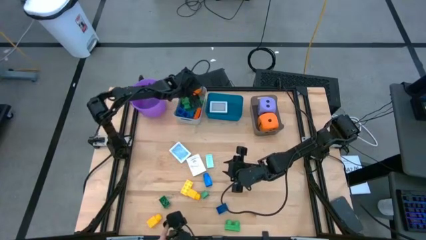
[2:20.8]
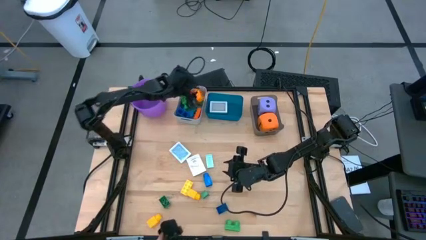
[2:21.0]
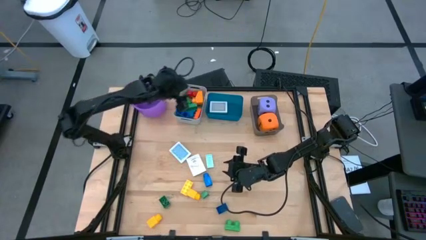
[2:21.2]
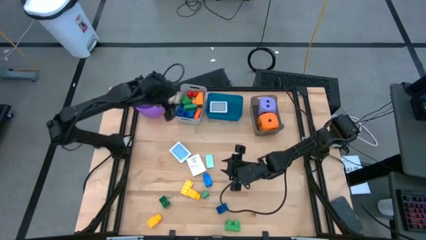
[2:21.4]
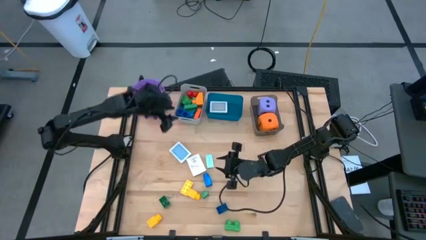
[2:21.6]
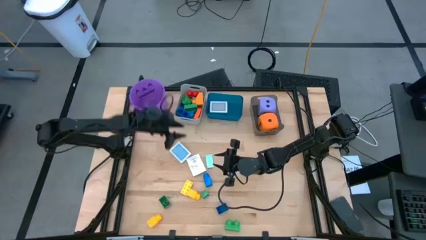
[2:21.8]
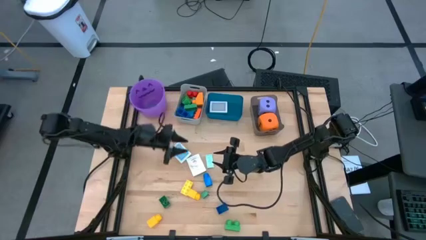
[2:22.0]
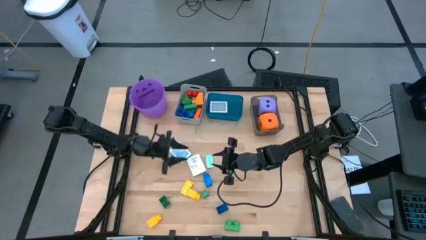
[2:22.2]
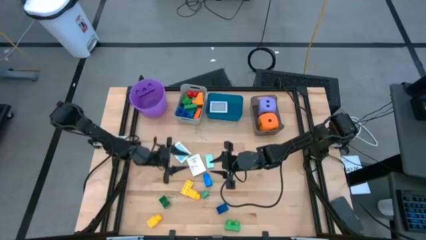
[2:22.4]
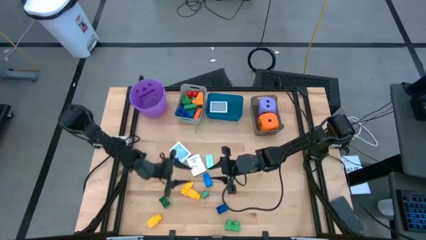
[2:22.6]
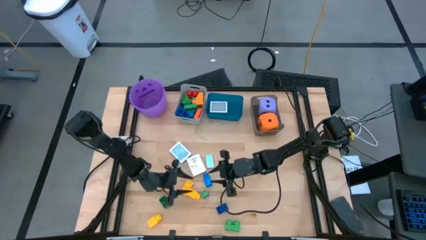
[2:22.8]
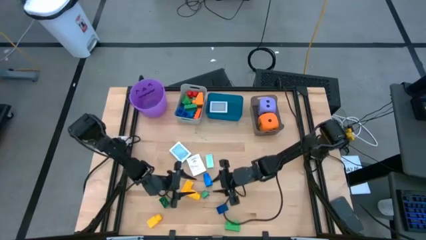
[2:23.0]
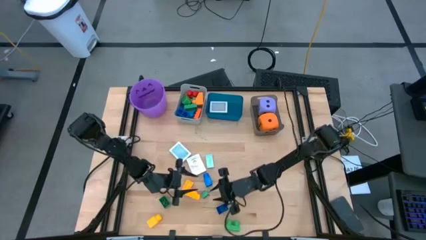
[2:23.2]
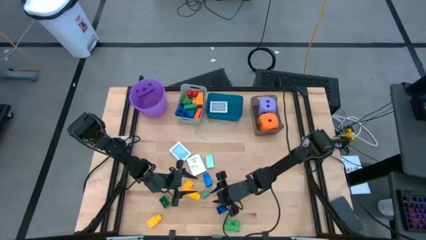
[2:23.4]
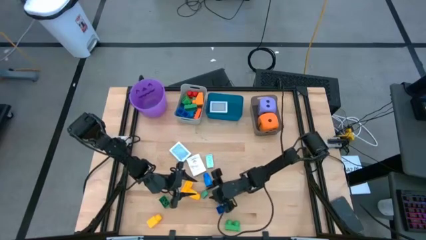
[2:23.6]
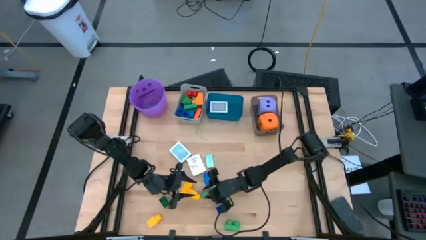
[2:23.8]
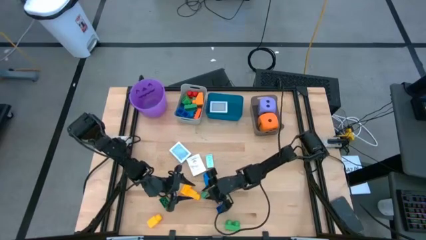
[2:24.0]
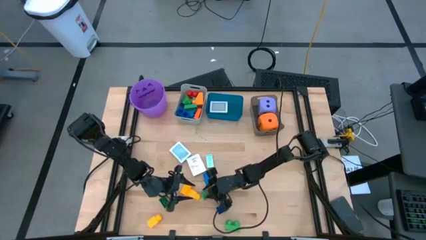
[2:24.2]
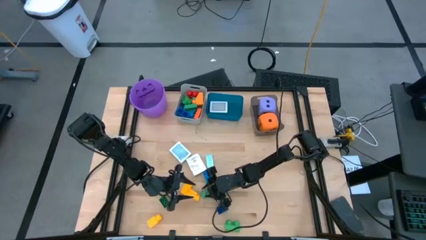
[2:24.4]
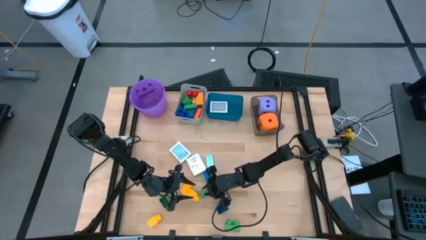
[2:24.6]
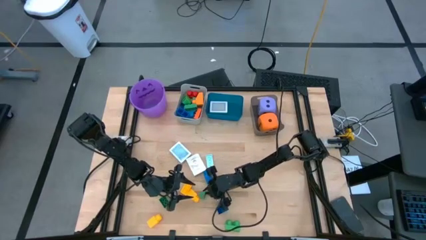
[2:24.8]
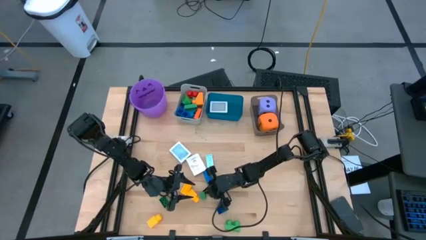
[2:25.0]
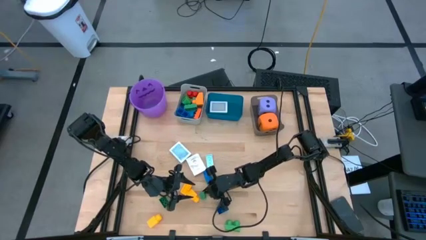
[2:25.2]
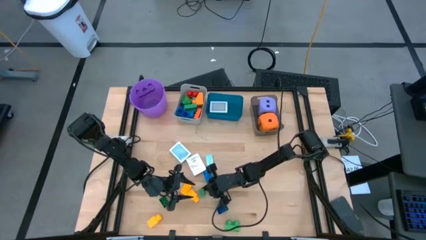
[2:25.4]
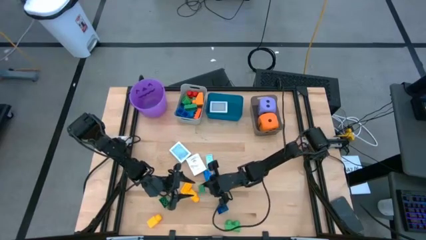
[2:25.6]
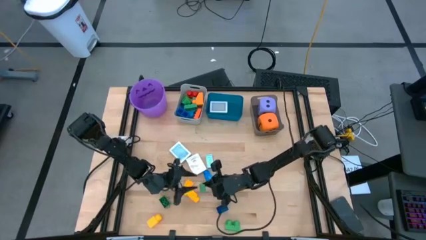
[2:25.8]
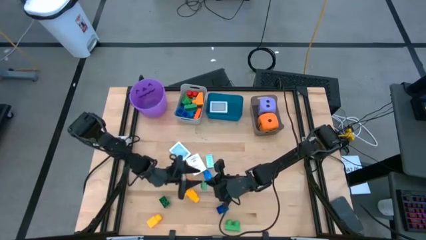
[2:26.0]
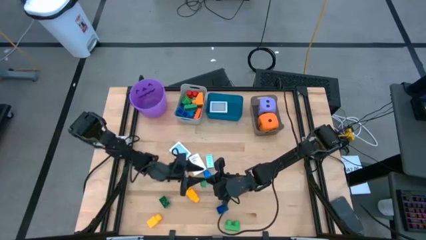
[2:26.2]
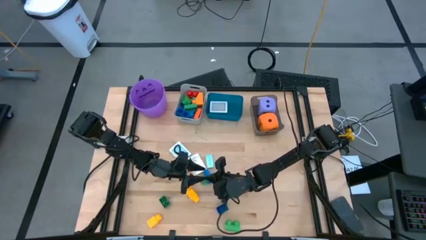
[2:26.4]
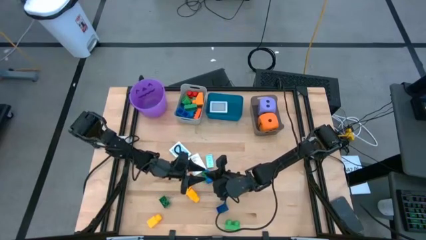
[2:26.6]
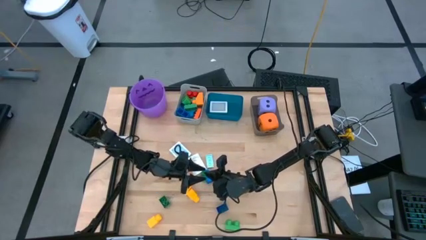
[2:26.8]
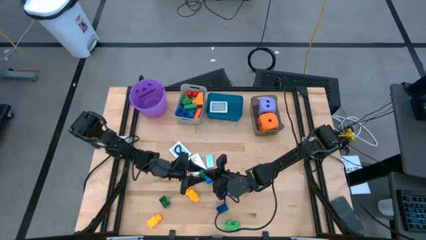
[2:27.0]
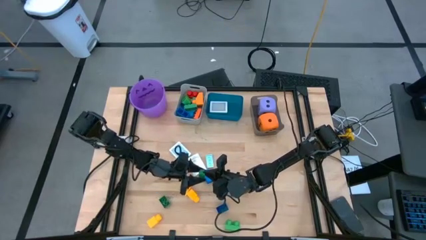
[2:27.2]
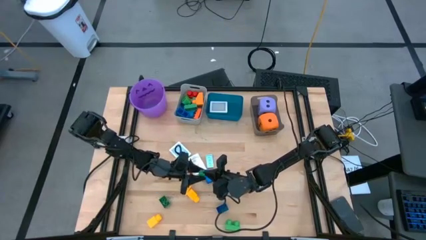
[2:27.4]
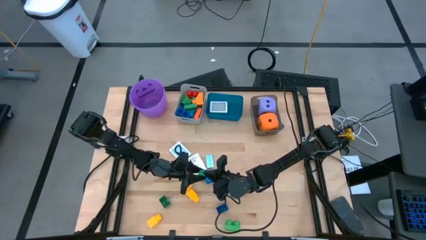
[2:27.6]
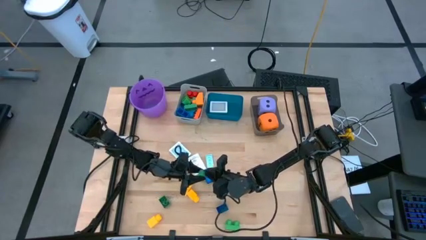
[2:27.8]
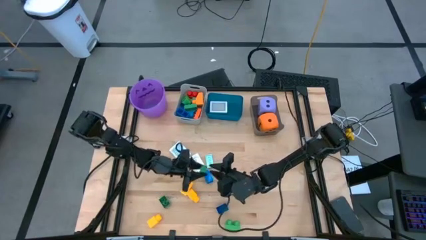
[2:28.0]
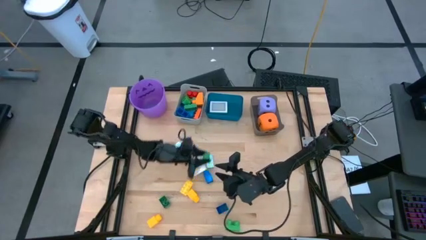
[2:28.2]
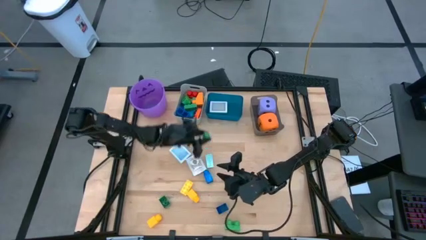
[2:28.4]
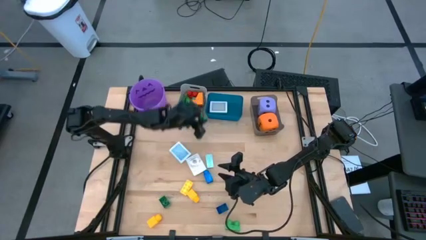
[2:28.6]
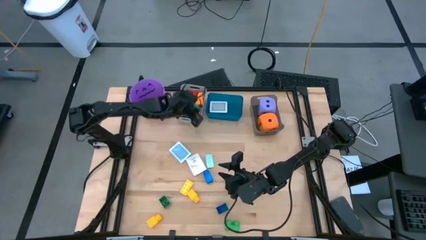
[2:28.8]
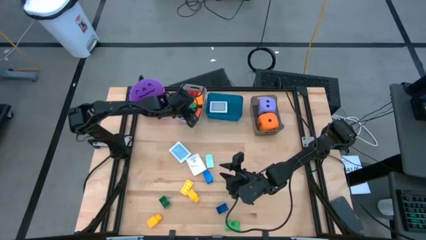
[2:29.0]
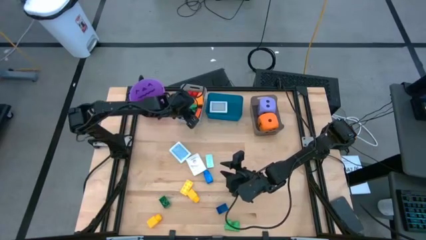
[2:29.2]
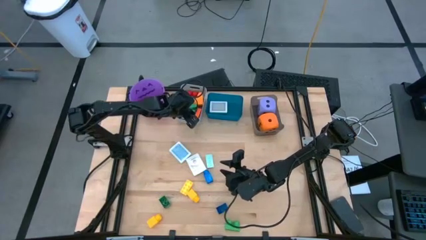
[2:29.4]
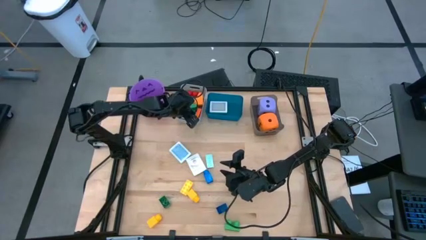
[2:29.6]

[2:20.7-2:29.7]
Task: Pick & Place Toys
Put the dark green game piece into the gray bin

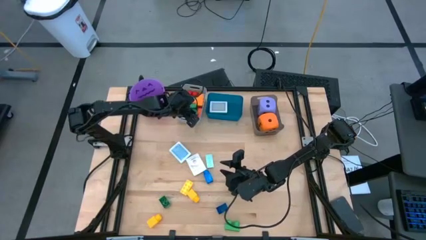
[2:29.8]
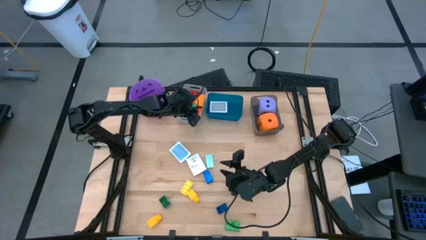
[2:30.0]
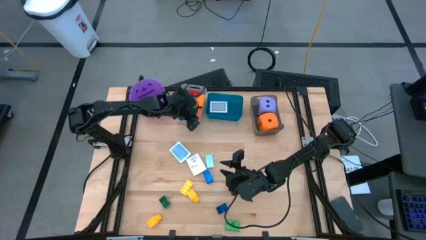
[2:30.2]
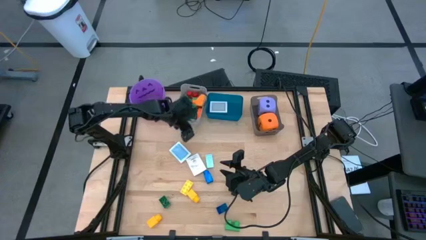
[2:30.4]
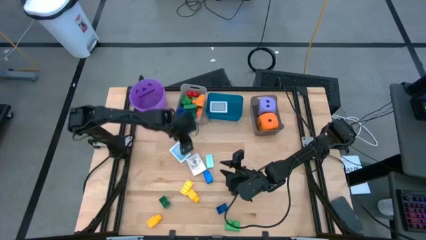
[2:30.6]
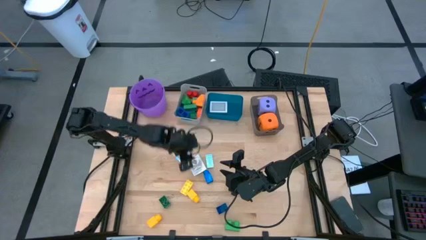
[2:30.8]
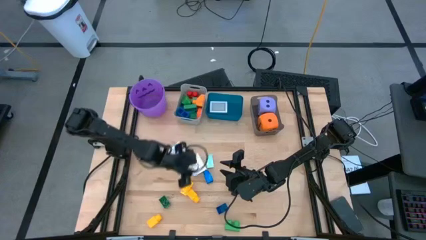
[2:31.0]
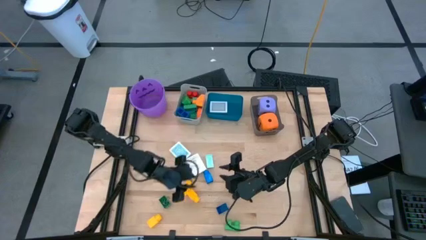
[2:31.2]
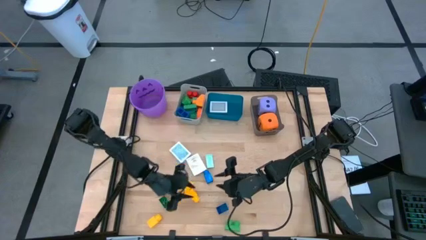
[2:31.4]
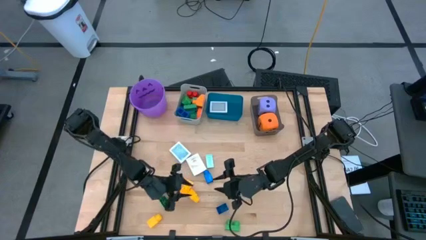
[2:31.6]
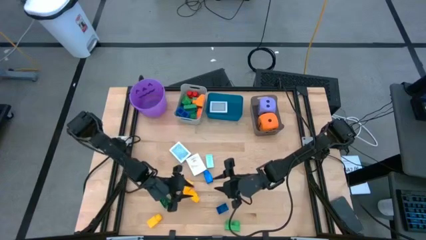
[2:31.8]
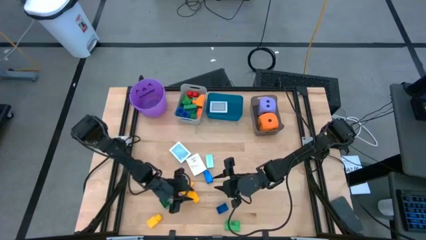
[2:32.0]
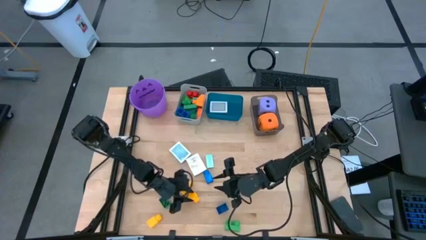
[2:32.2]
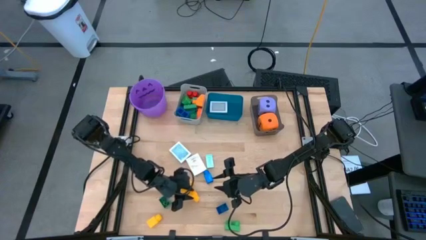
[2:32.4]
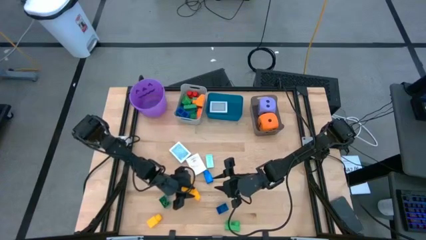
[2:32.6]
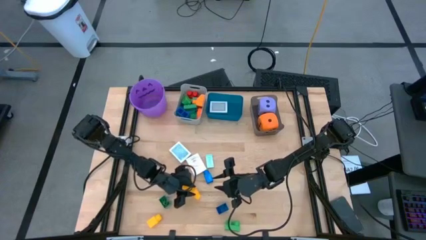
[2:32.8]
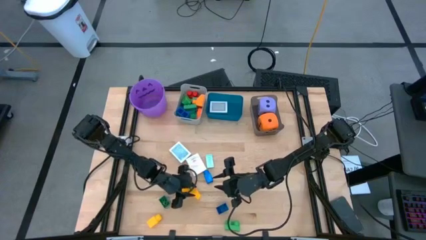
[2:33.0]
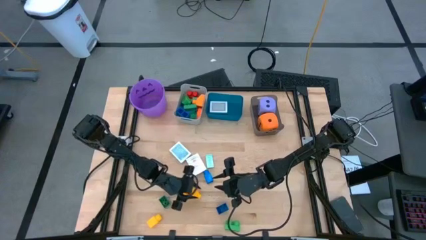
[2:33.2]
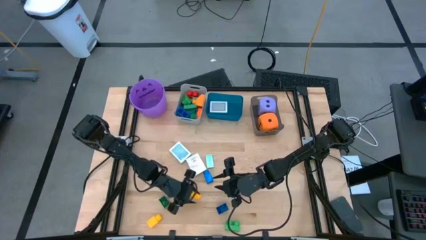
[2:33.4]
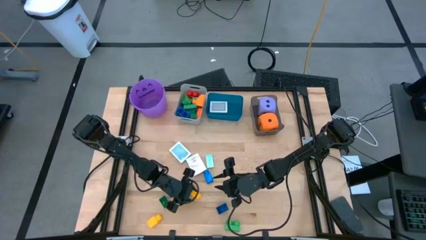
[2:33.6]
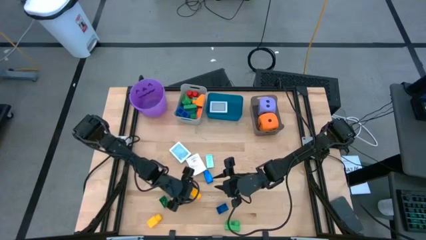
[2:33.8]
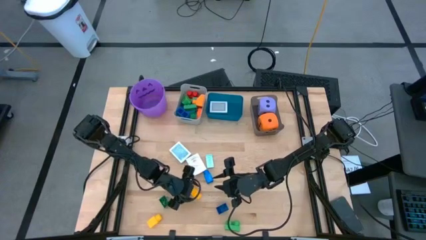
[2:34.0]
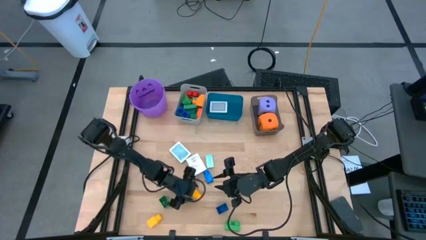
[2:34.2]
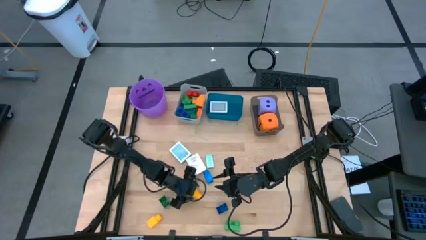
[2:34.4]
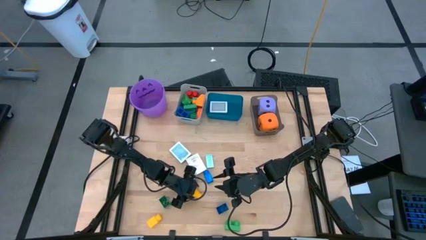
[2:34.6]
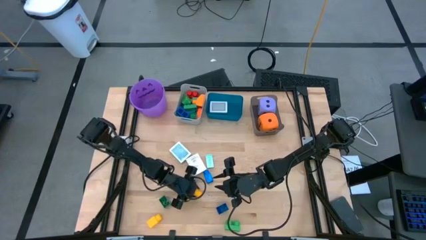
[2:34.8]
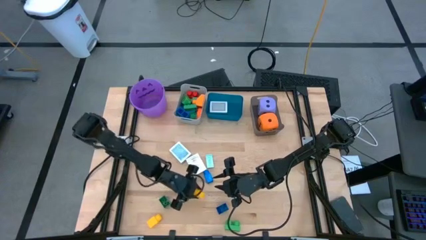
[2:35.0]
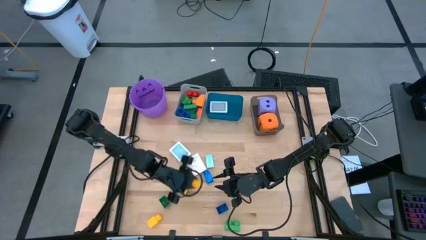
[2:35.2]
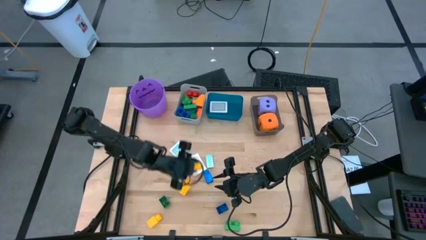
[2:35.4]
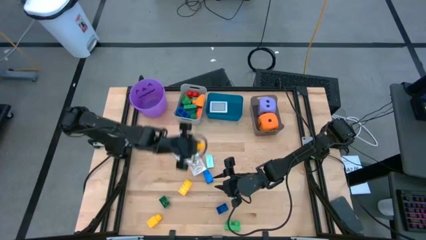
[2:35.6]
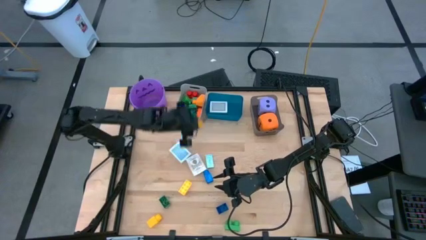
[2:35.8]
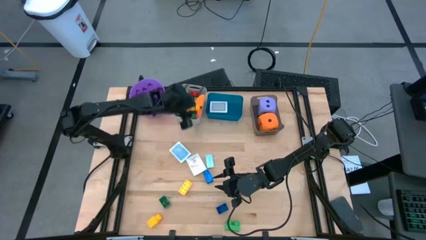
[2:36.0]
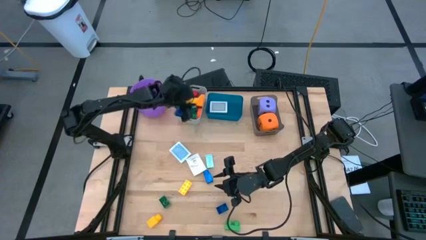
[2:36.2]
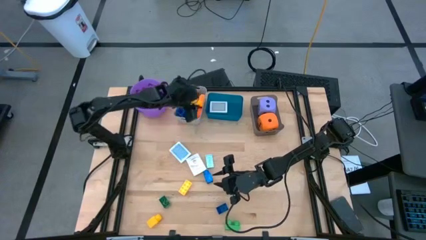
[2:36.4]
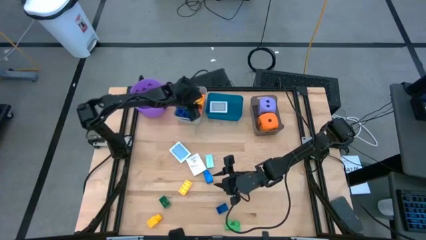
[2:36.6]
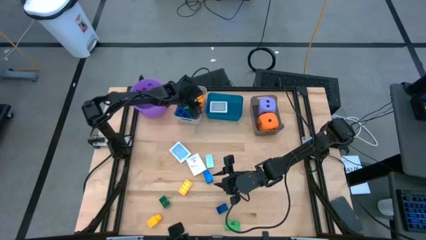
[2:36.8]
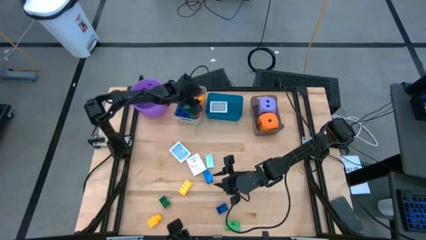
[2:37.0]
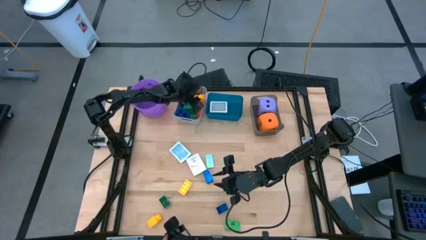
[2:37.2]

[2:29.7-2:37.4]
Put the top yellow game piece into the gray bin
